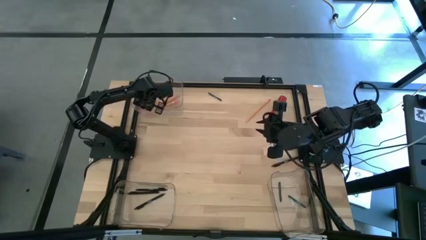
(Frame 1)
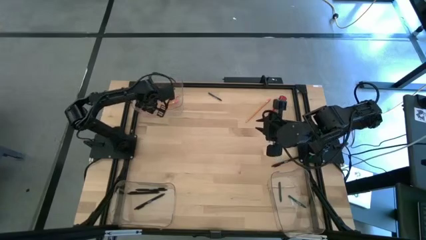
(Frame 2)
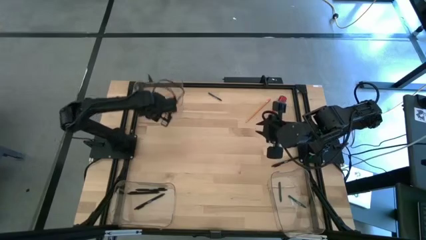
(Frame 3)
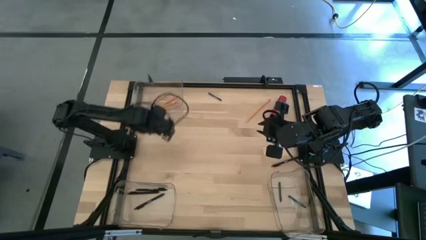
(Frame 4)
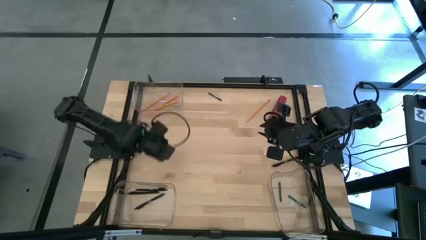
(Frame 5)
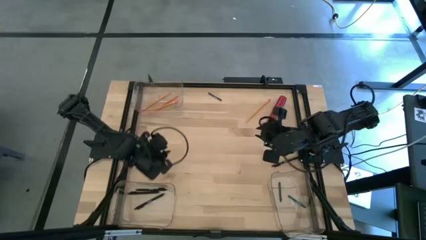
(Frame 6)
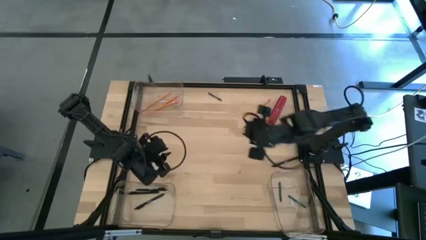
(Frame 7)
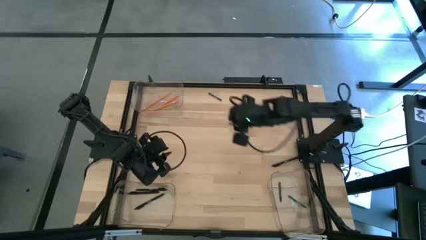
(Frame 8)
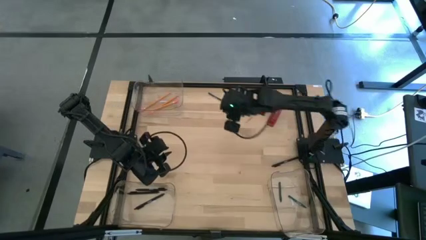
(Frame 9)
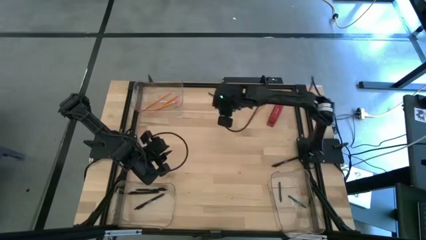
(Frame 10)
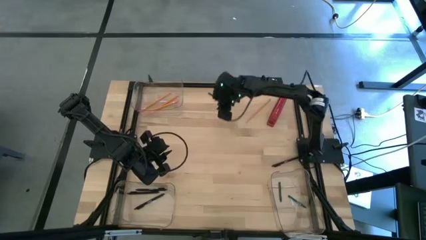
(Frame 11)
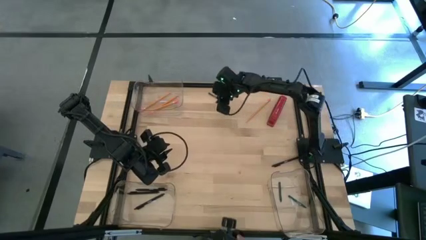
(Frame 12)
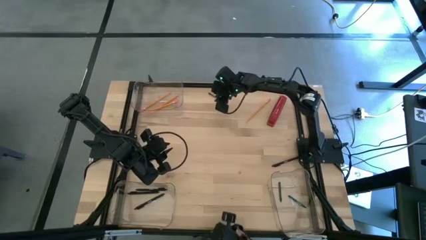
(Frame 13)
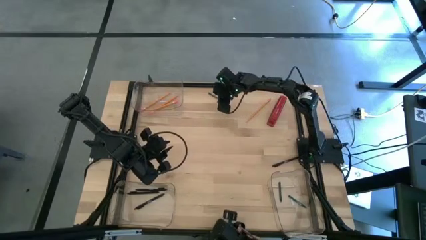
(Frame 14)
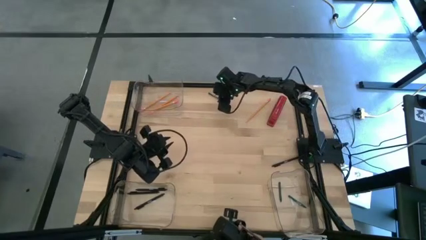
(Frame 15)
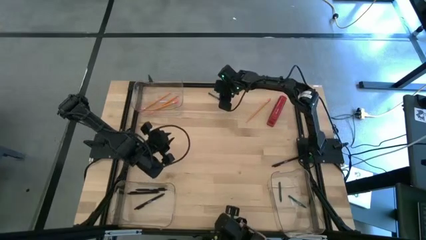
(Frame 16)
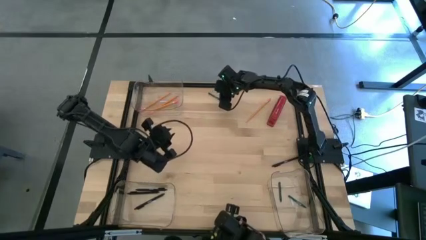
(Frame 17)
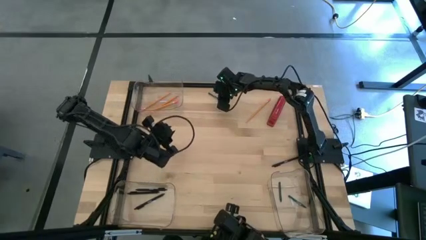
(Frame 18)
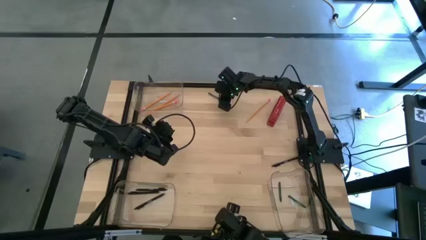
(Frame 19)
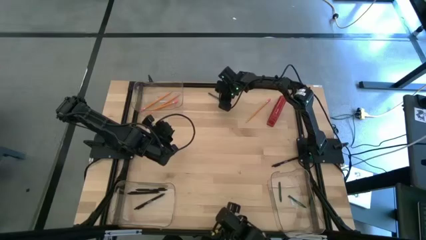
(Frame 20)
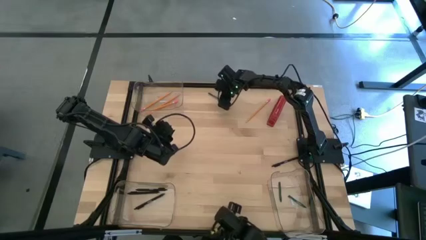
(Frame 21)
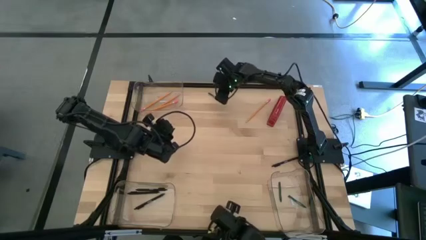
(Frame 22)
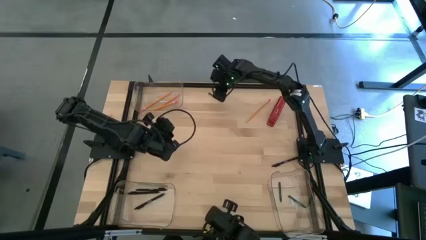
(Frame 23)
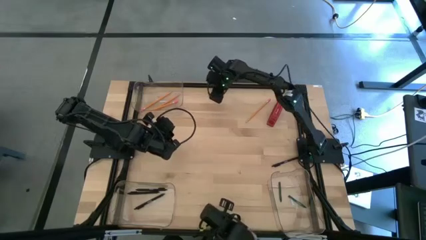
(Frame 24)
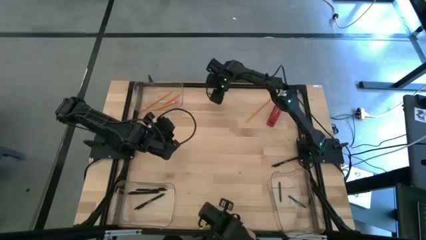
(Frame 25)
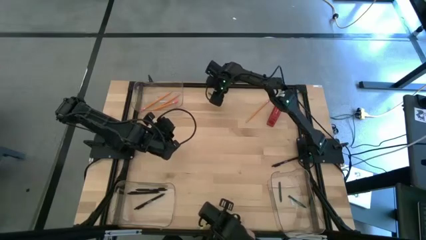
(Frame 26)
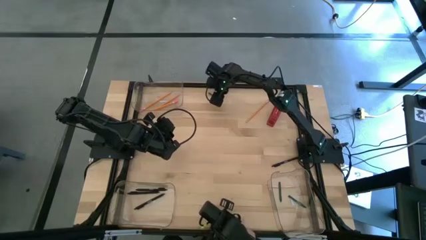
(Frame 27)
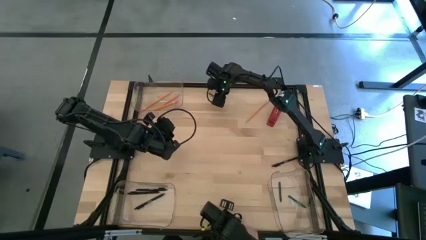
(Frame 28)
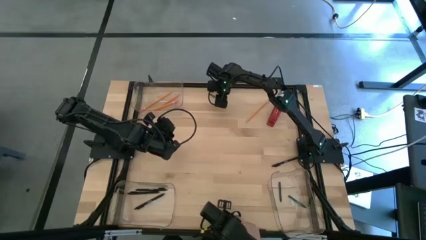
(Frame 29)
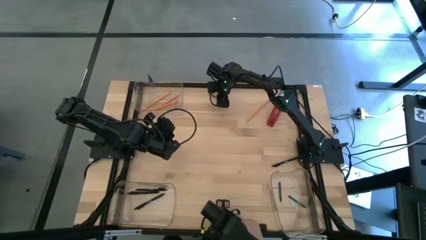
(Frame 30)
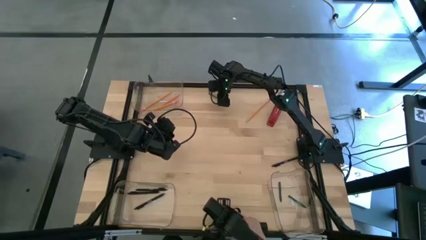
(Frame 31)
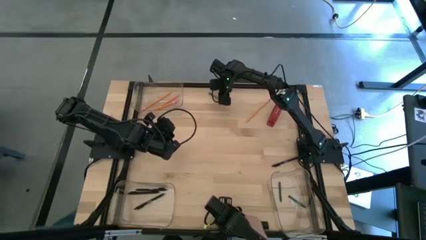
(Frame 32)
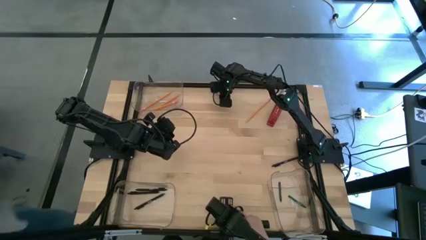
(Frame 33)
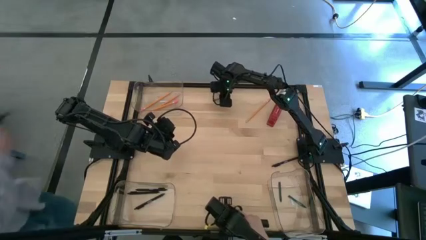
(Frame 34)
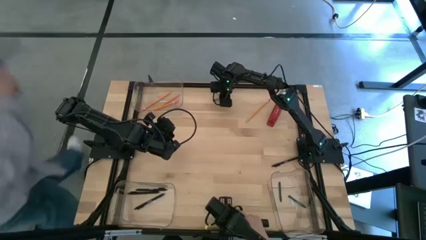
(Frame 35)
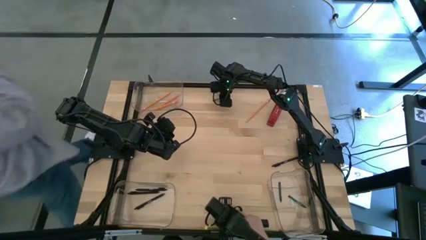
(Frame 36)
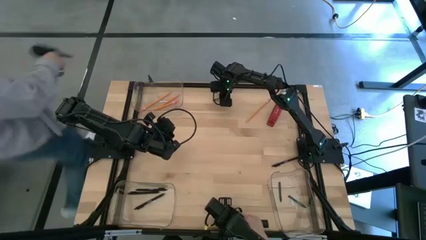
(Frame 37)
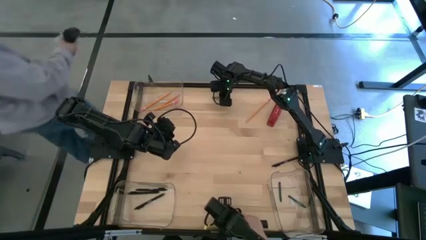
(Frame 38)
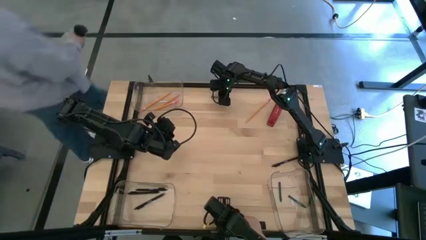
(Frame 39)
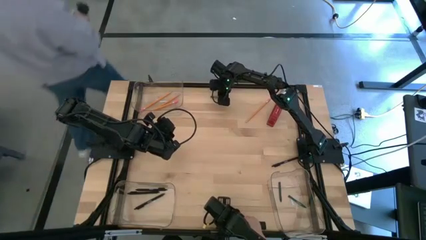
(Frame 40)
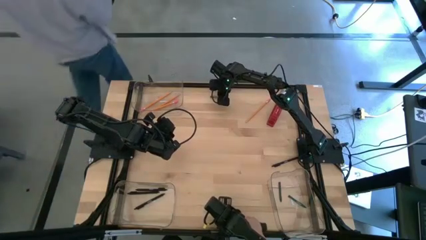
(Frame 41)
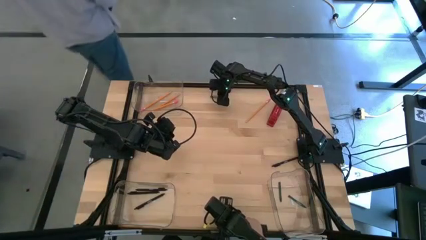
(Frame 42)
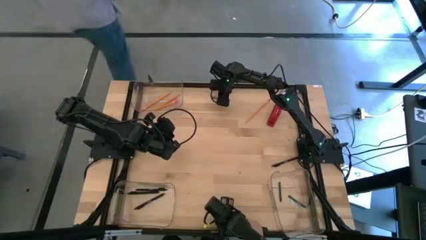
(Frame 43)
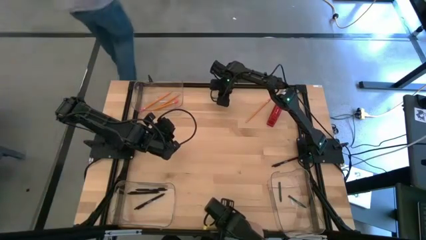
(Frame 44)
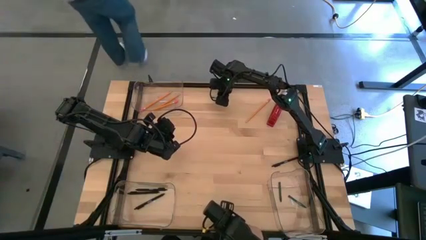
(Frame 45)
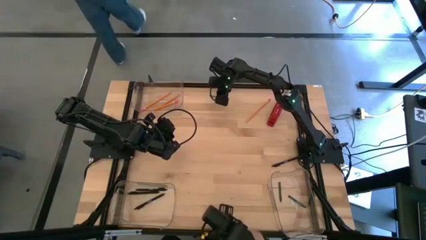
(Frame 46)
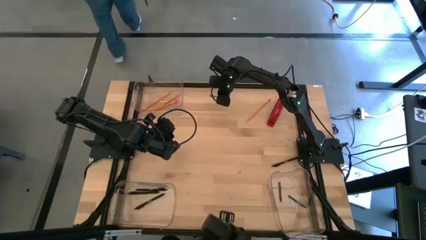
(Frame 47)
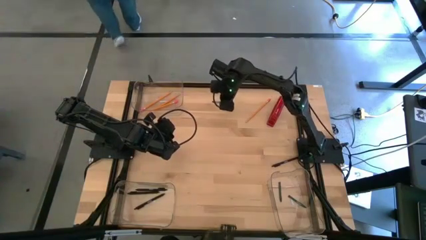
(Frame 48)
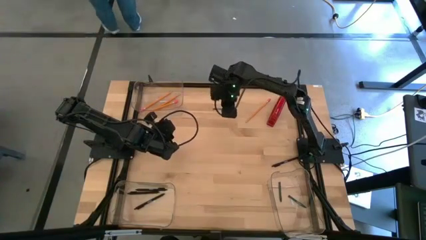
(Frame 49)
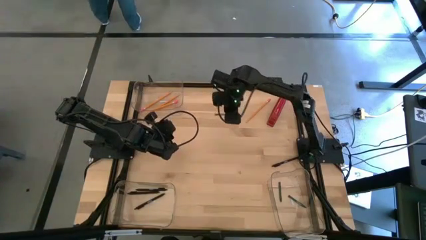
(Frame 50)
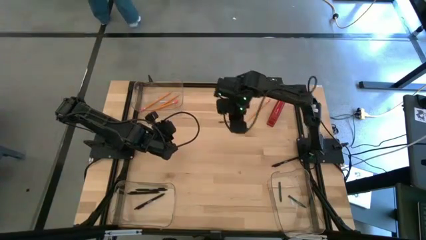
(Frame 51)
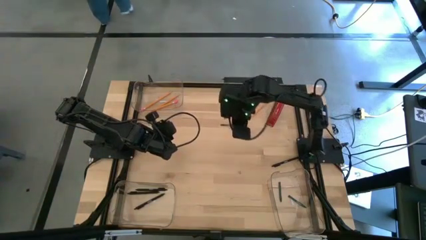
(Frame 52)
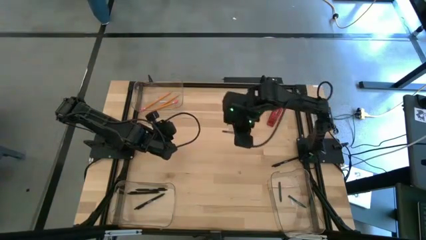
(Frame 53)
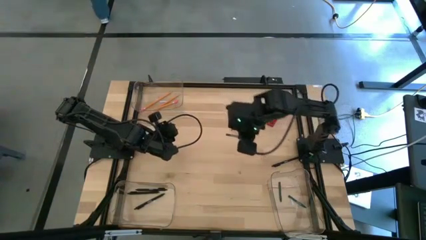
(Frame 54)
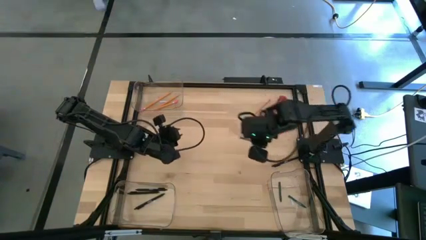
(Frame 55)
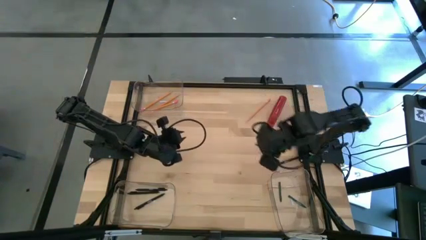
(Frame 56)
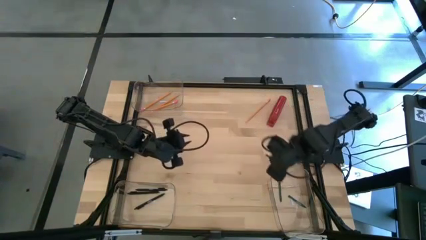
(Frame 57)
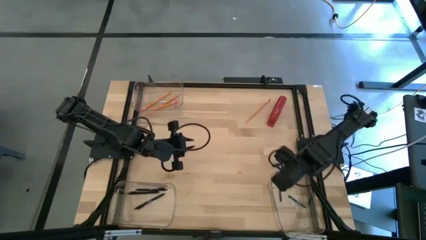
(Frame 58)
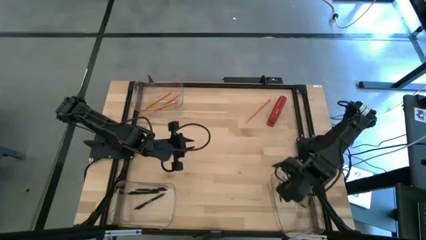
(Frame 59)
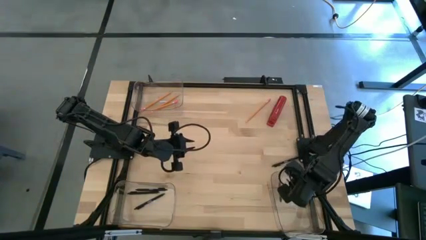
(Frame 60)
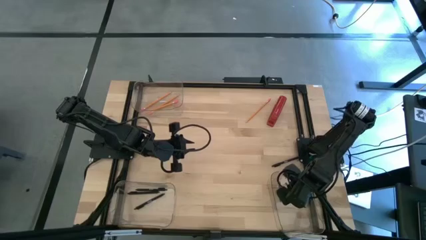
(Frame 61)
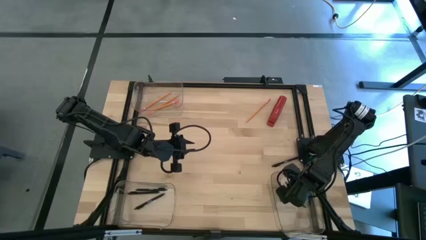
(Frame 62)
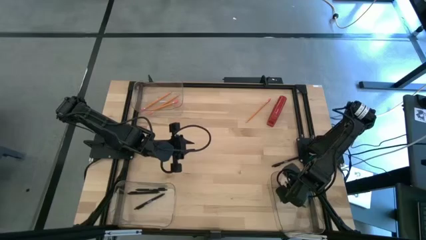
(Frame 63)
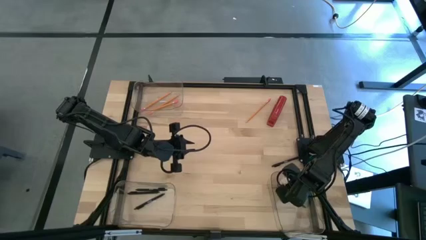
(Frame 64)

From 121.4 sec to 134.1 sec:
Task: Sort crayons/erasers/pens/pencils in bins
Put the green crayon into the bottom right transparent bin

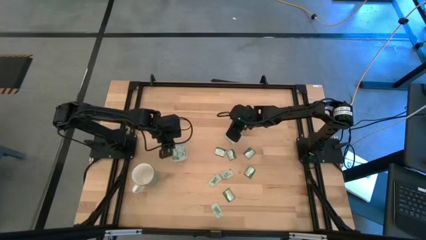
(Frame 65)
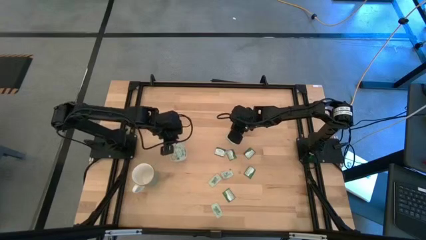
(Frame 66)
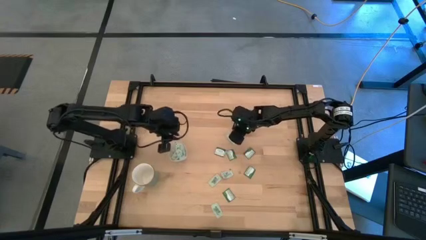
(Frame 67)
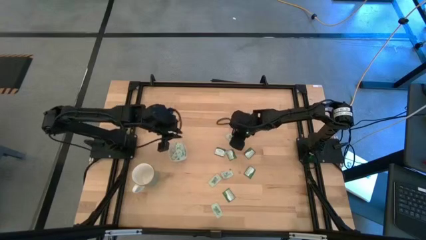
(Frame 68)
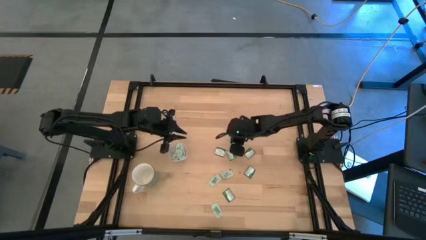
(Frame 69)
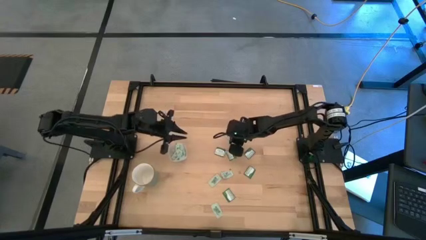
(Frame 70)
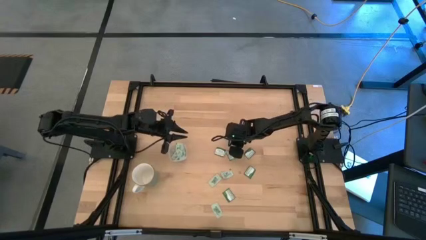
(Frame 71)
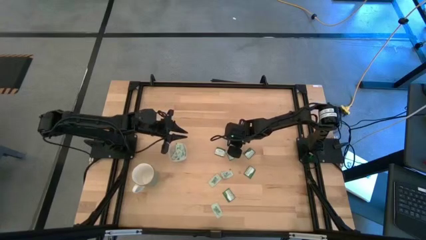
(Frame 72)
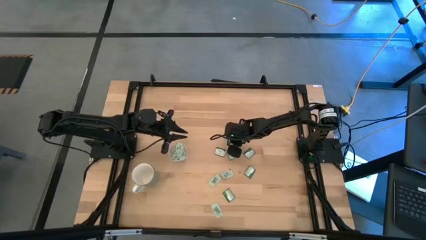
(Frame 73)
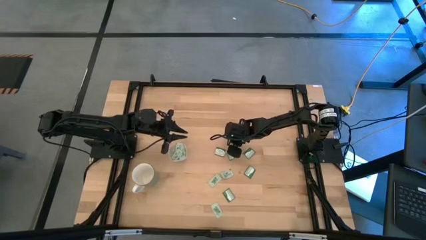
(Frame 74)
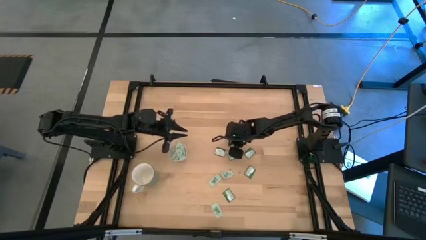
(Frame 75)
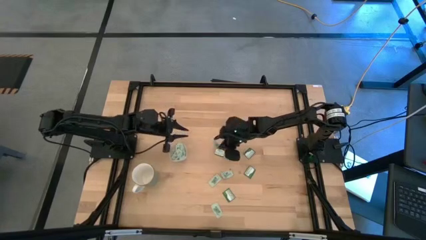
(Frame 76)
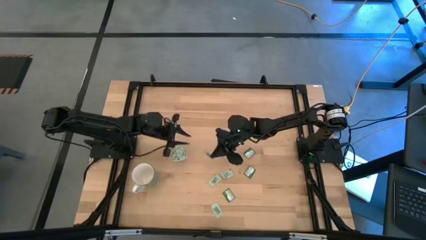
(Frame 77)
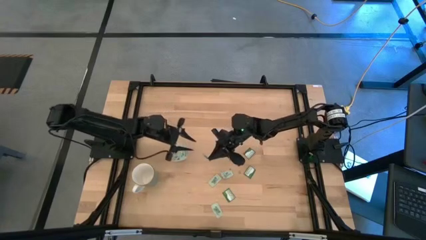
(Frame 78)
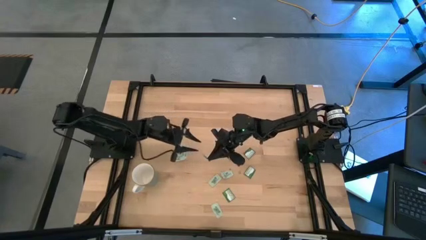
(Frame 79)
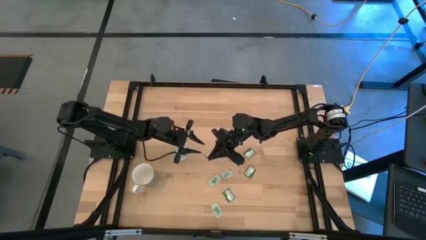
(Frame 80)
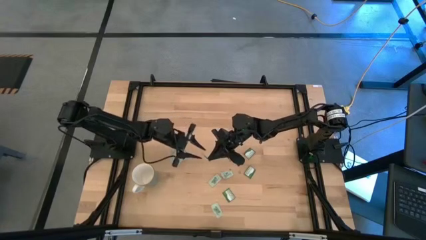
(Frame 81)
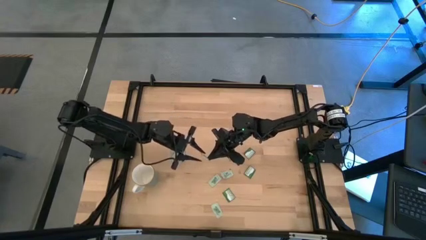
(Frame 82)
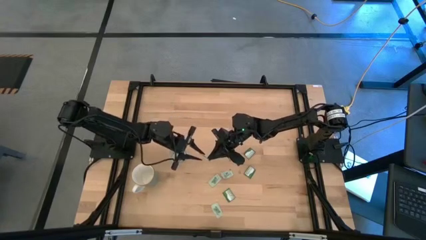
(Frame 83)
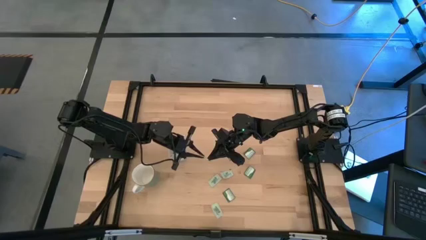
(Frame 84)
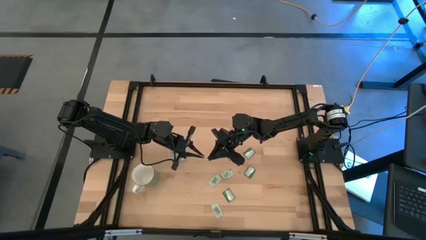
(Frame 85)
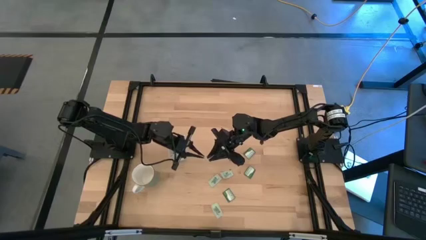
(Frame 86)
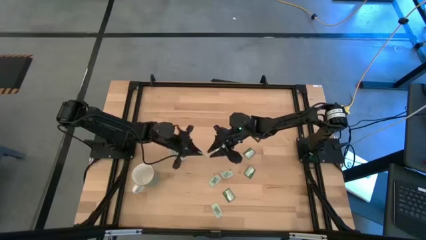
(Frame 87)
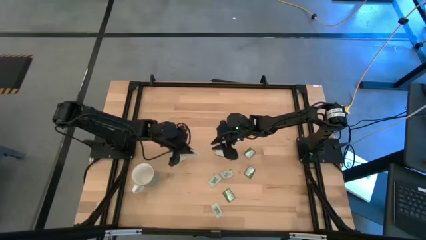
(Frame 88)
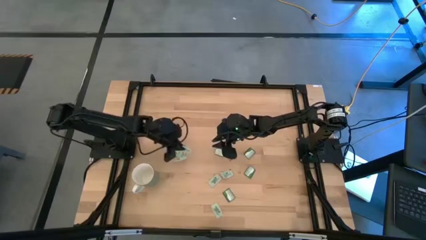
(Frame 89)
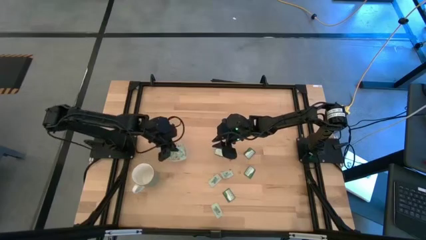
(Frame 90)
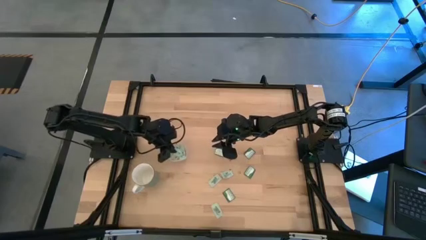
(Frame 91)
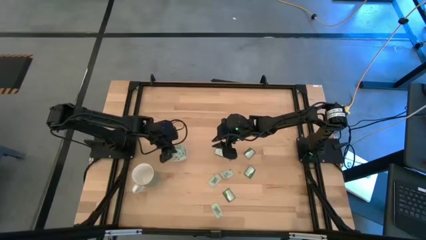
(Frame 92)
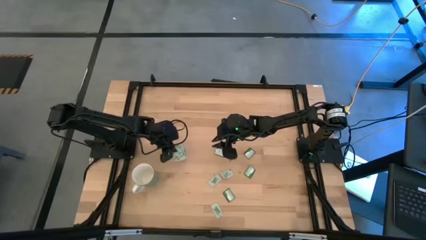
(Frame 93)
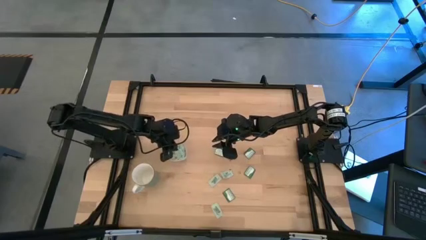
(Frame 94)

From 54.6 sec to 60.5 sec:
Task: Pick and place Stevia / Truvia into bins
Put the green stevia packet into the transparent container
